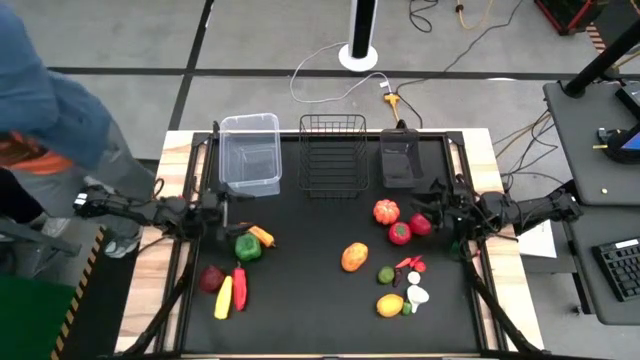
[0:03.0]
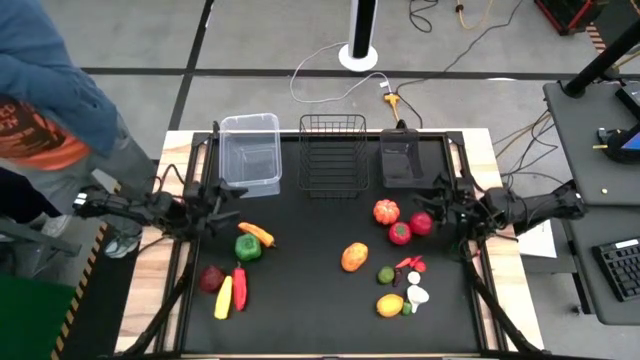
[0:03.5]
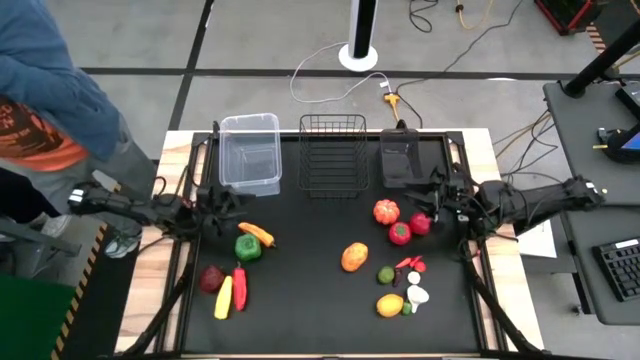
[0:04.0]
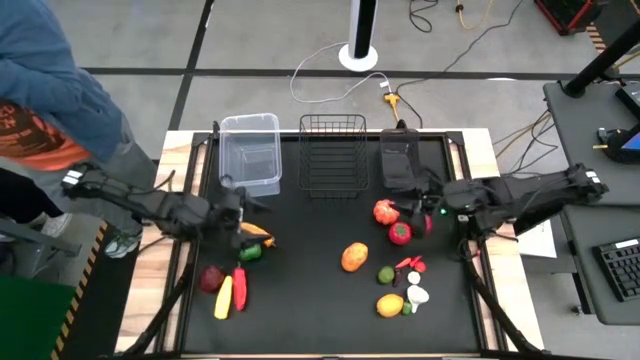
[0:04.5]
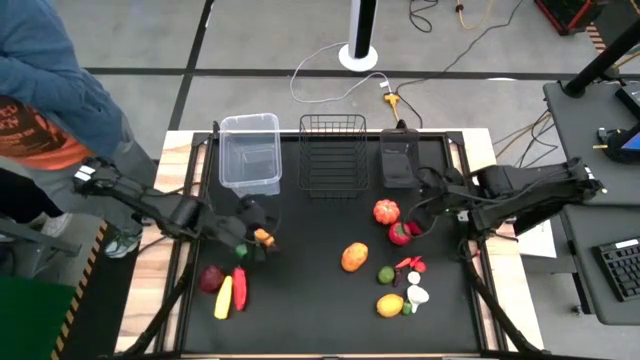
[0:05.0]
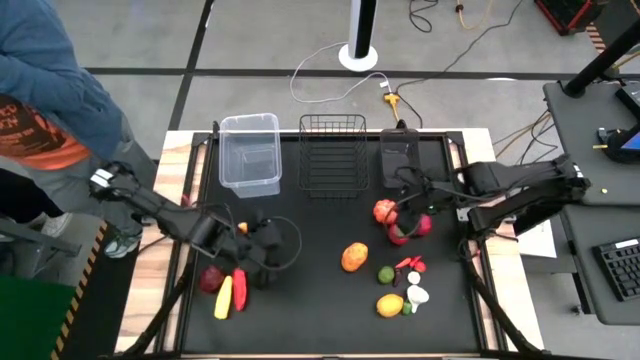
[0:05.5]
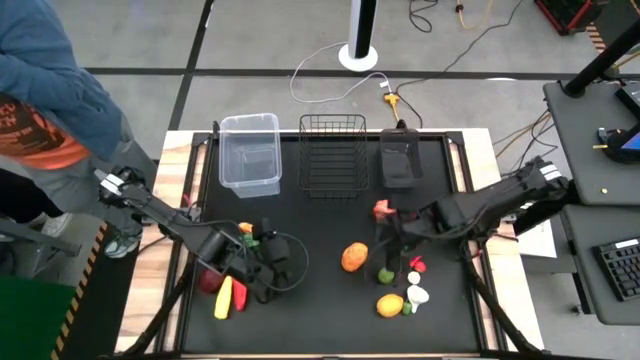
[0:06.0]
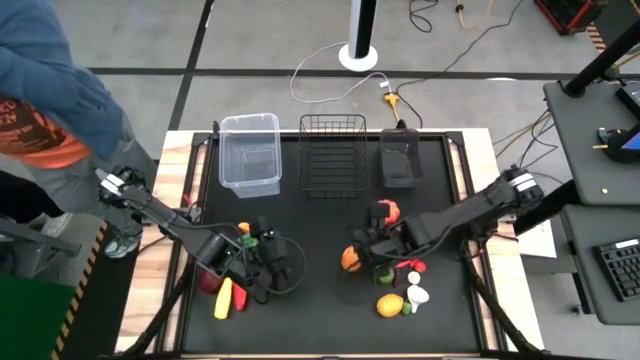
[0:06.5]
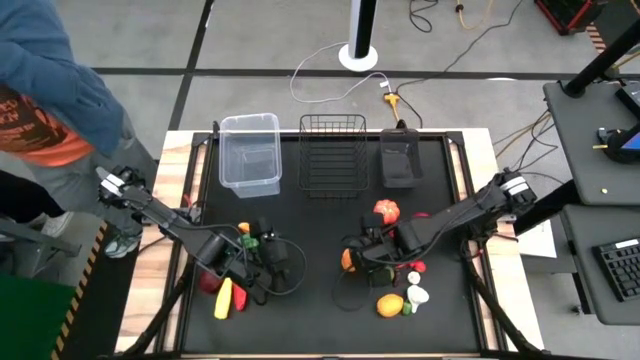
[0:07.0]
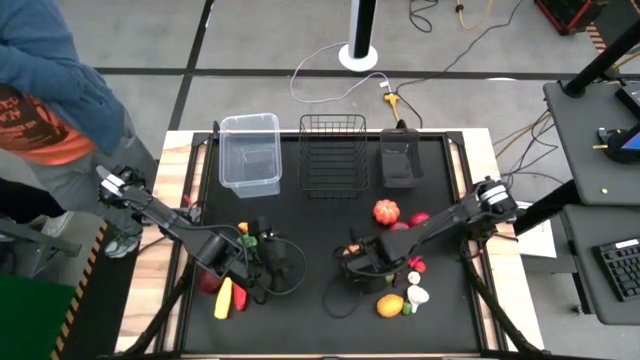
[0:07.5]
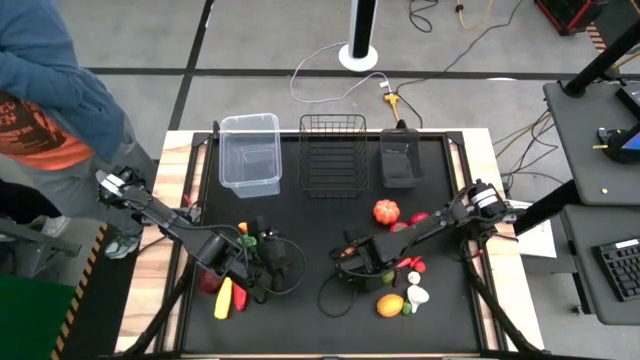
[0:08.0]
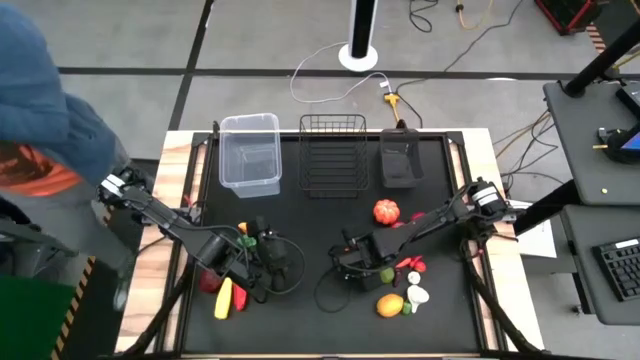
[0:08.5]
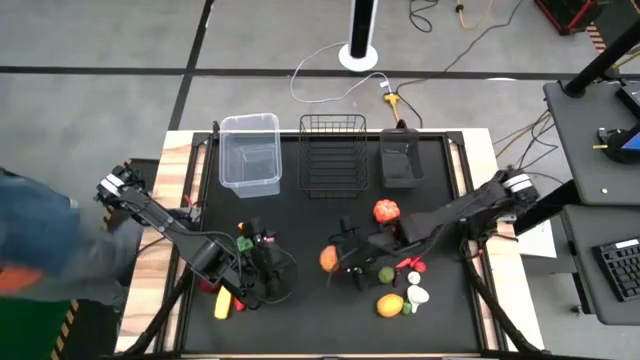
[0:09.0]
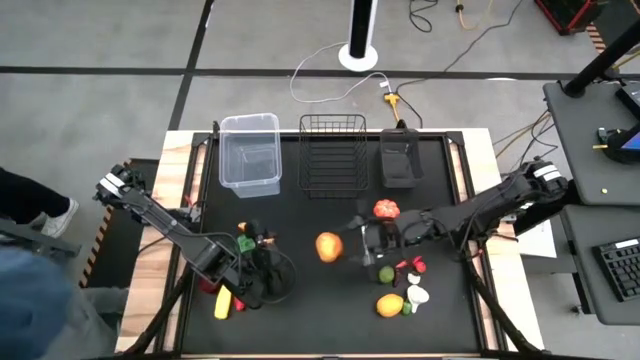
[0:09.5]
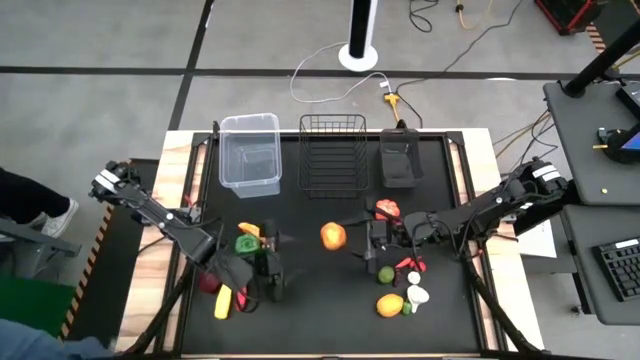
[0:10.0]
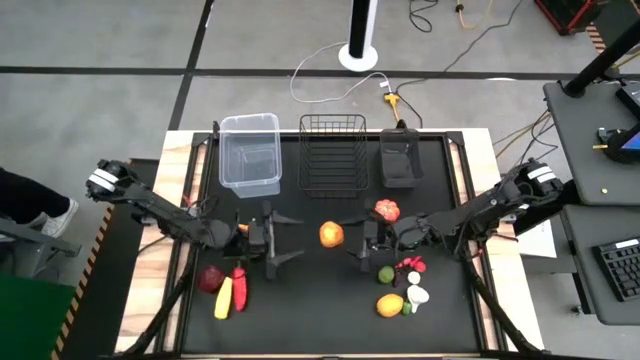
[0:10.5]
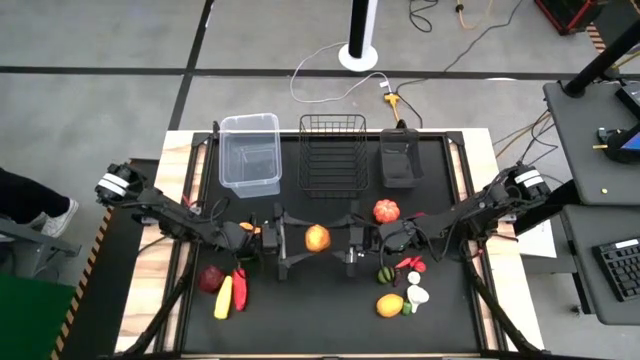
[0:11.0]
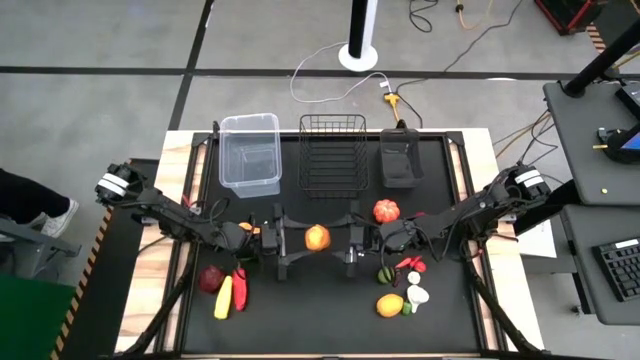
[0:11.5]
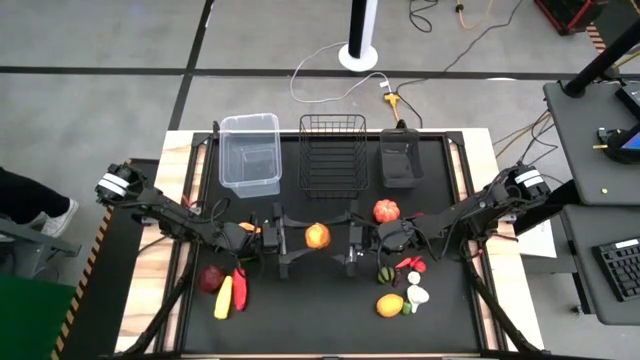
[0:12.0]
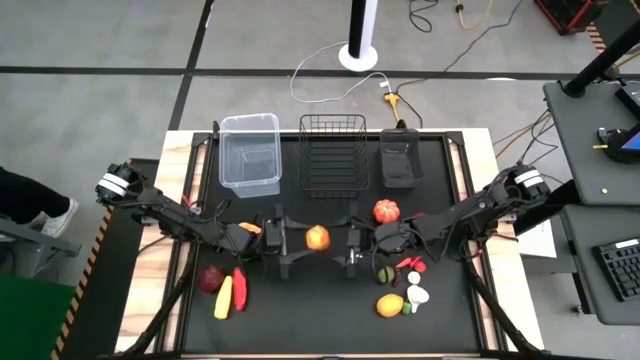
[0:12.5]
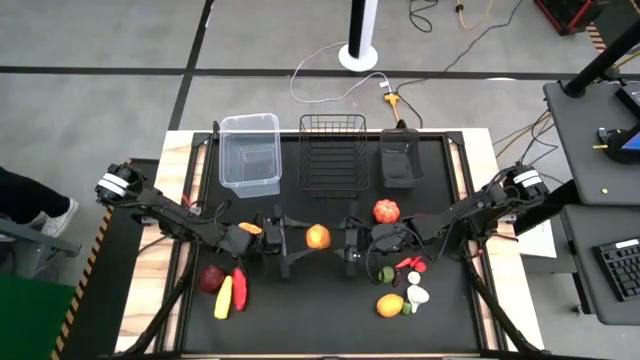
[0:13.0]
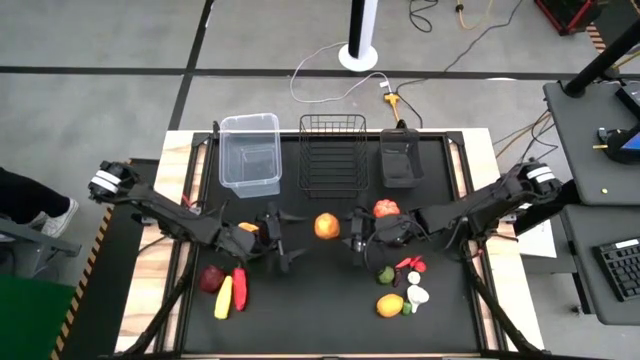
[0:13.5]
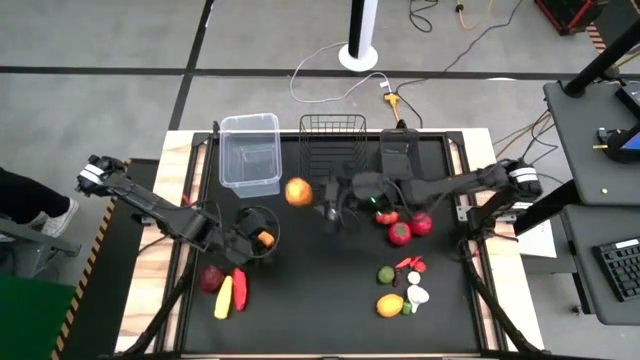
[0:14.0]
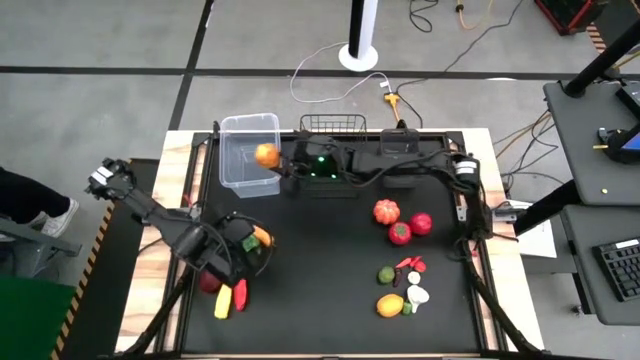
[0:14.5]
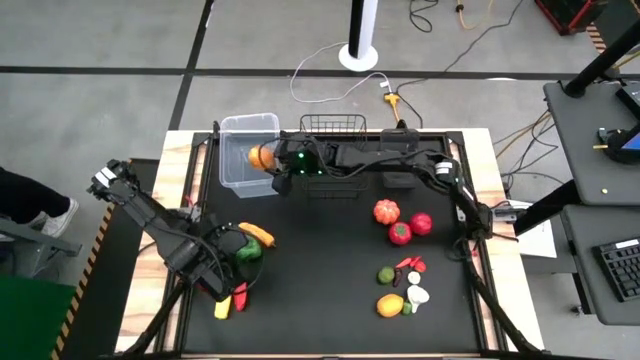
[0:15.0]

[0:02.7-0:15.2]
Task: Sort produce into baskets
Put the potato into the transparent basket

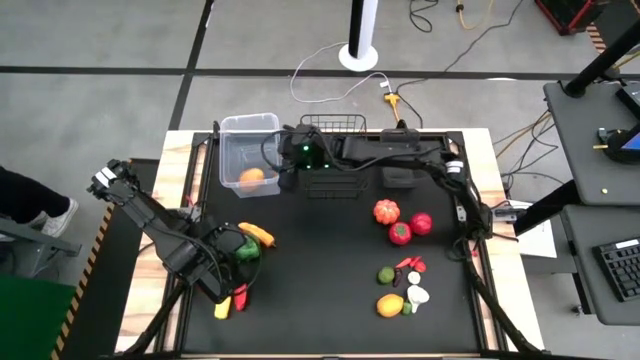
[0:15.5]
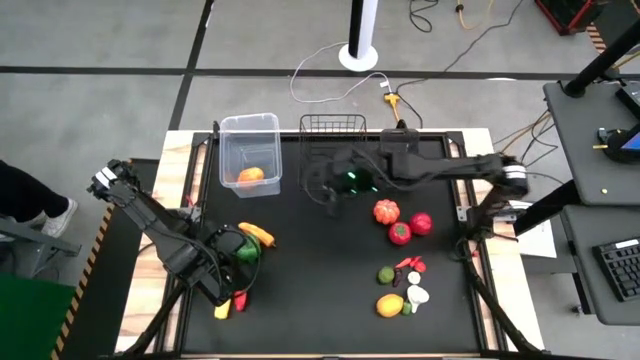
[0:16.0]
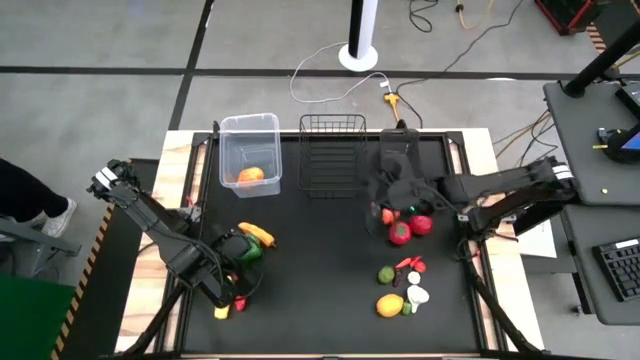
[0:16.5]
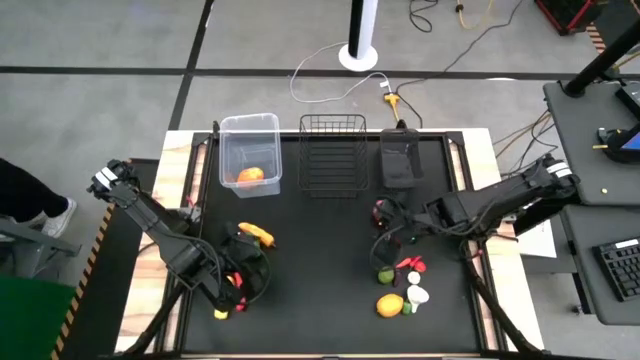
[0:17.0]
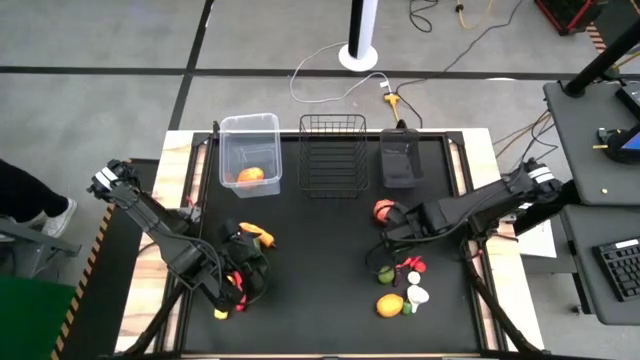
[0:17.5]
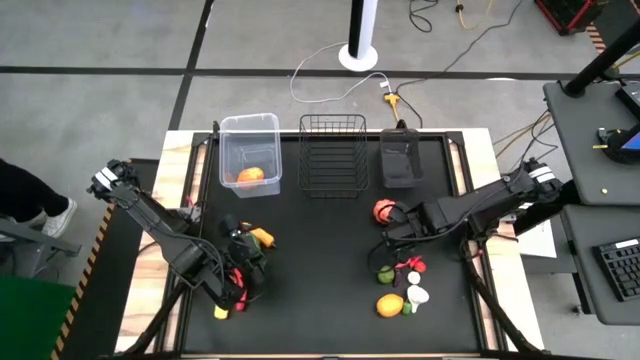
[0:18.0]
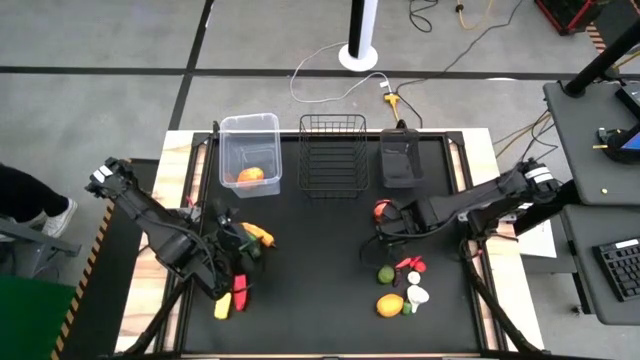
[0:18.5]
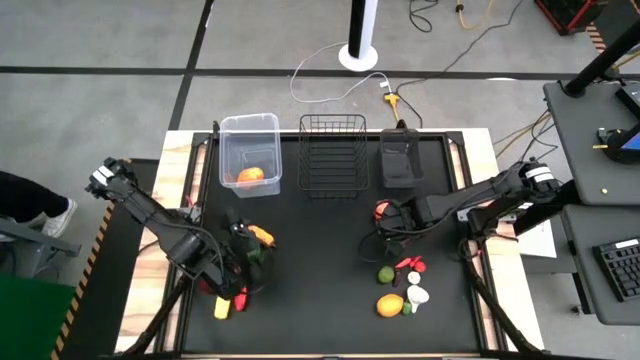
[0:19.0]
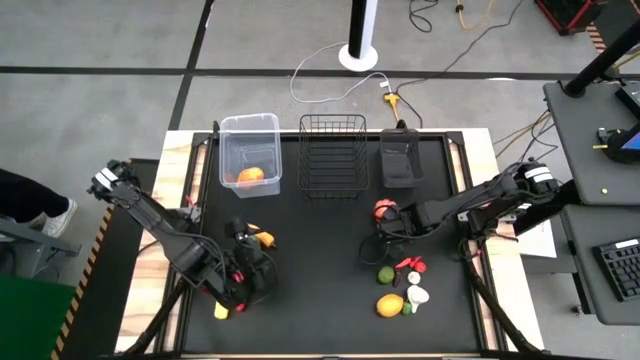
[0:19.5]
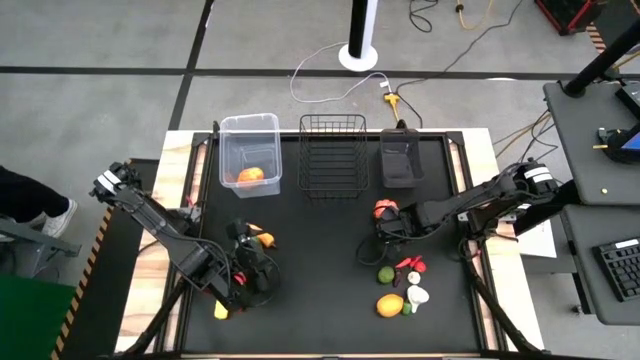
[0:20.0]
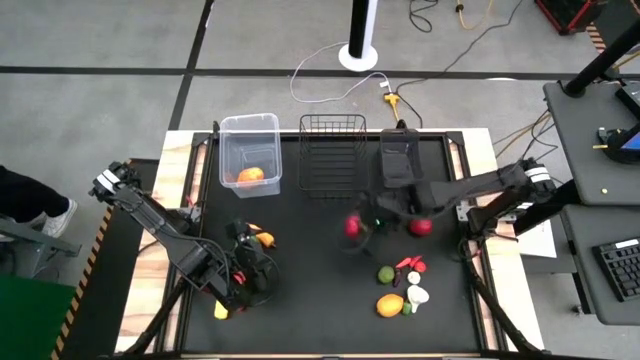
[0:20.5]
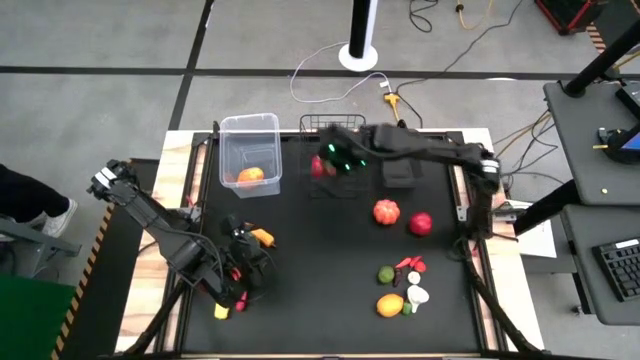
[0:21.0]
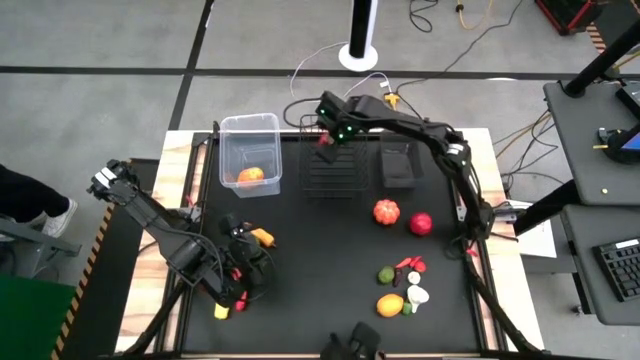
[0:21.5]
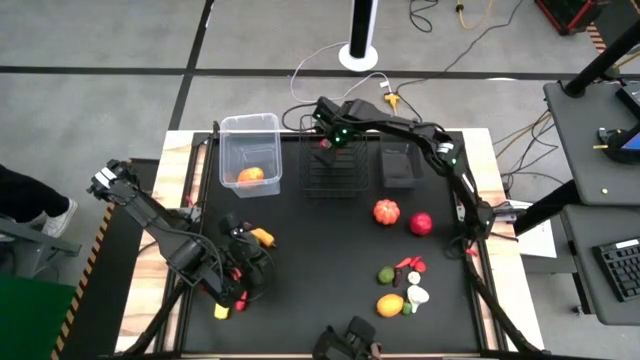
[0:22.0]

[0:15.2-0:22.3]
Put the left tomato into the wire basket

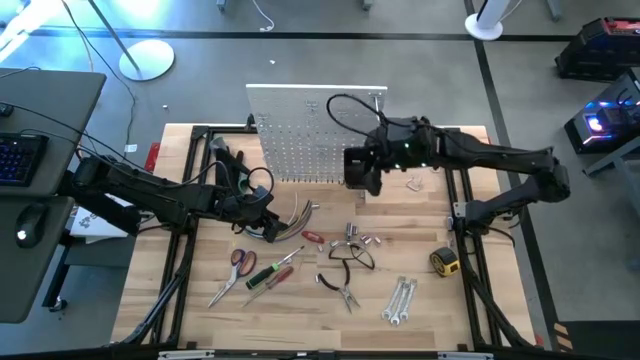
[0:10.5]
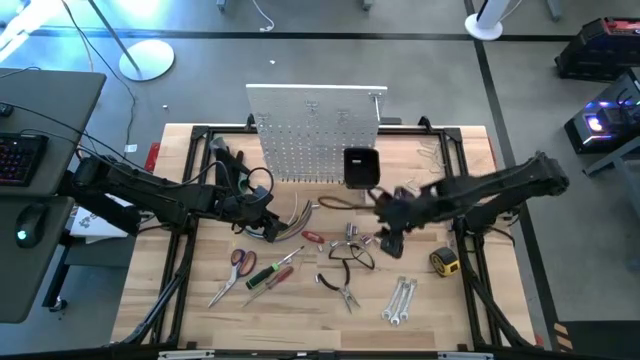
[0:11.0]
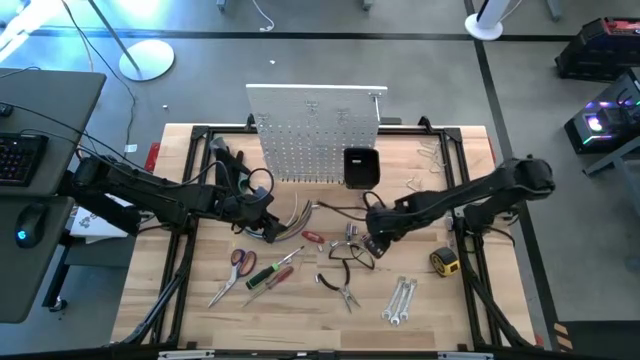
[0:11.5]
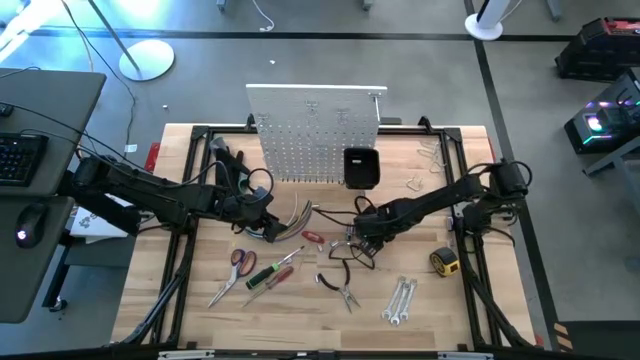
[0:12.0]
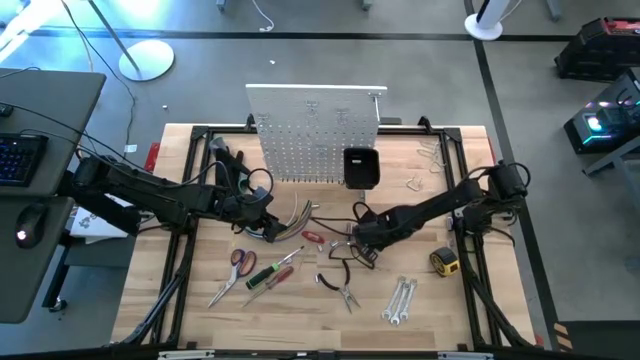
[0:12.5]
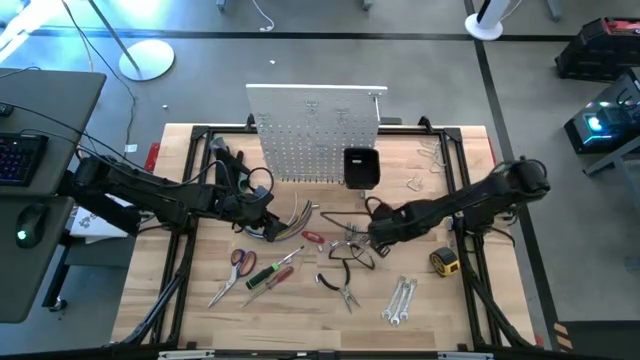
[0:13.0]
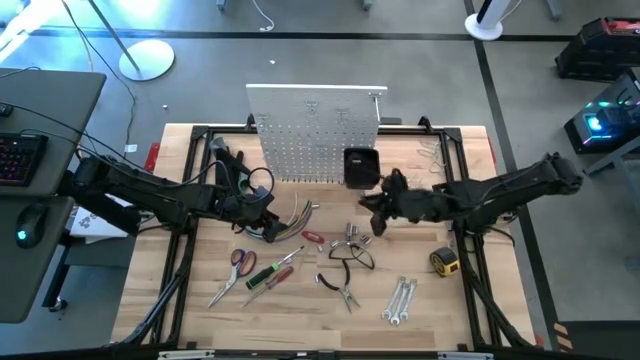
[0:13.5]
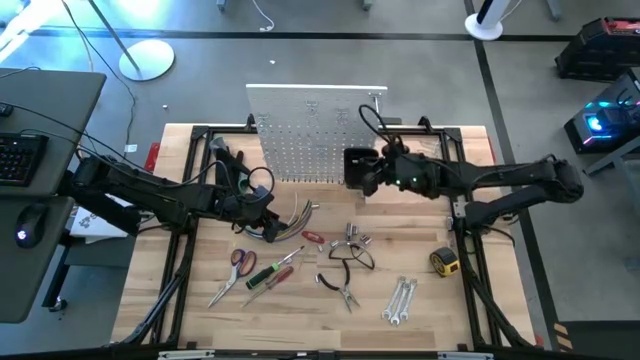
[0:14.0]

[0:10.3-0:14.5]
Task: Hang tools onto peg board
Put the socket into the black bin on the peg board
